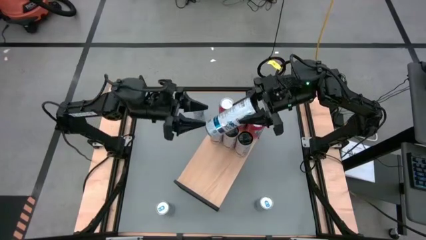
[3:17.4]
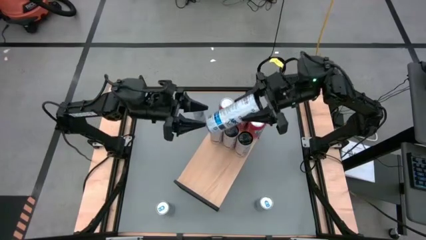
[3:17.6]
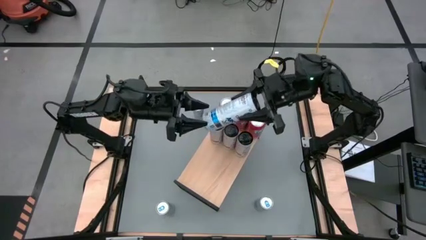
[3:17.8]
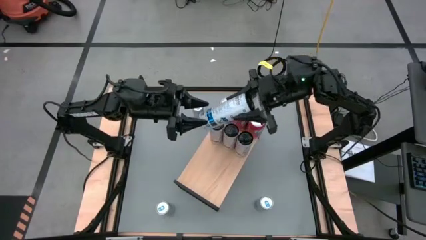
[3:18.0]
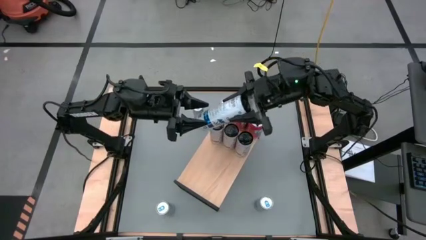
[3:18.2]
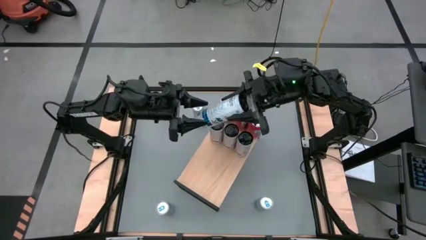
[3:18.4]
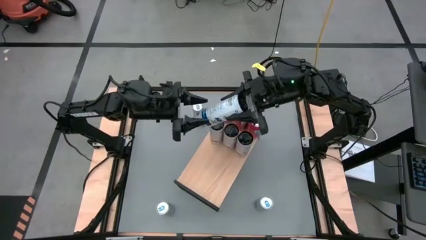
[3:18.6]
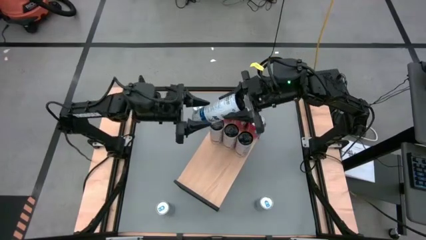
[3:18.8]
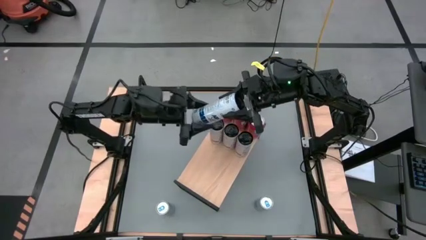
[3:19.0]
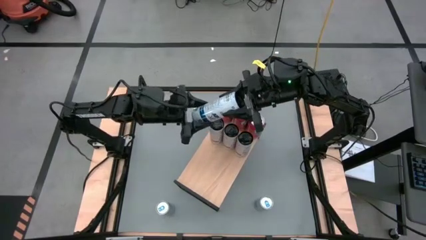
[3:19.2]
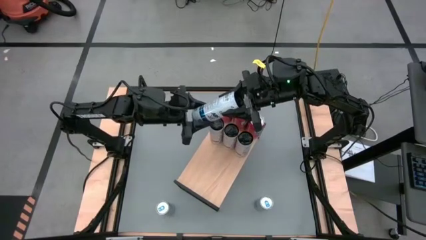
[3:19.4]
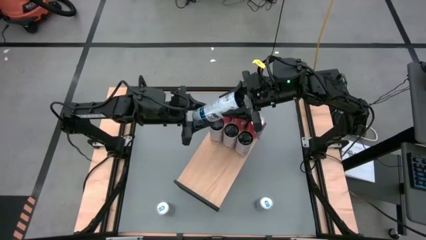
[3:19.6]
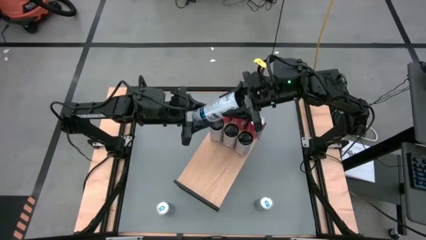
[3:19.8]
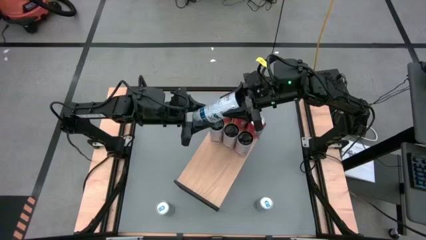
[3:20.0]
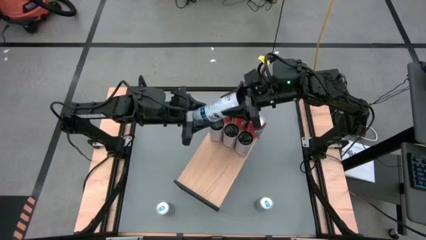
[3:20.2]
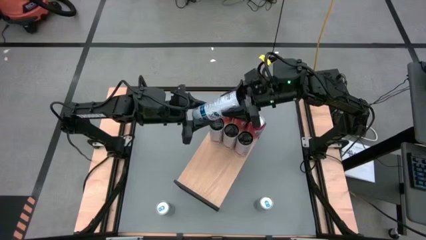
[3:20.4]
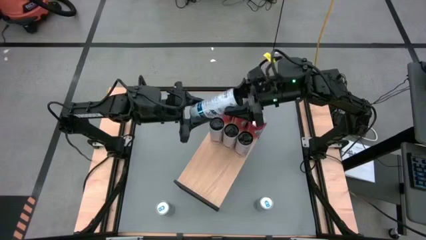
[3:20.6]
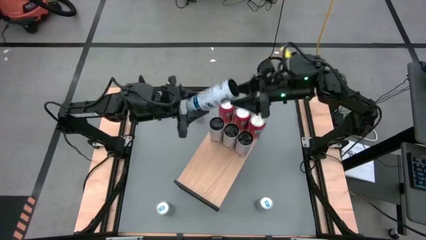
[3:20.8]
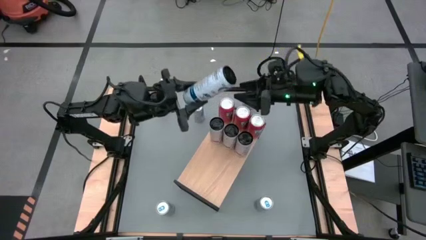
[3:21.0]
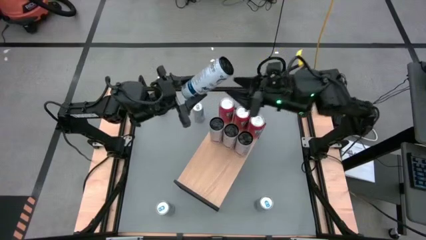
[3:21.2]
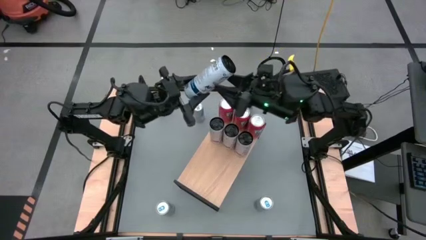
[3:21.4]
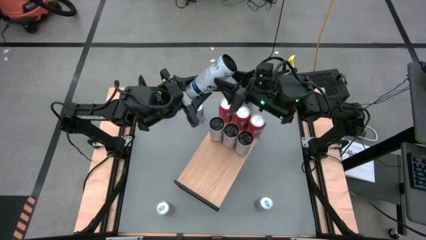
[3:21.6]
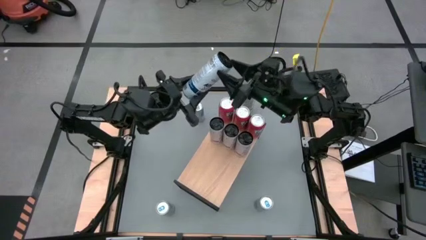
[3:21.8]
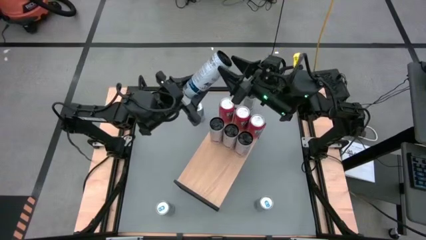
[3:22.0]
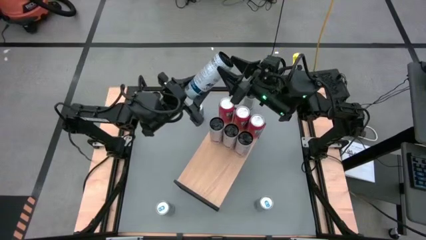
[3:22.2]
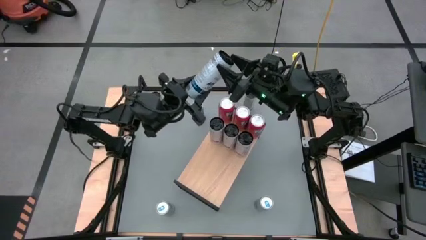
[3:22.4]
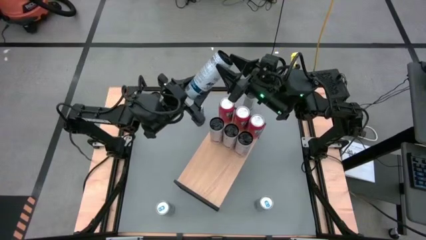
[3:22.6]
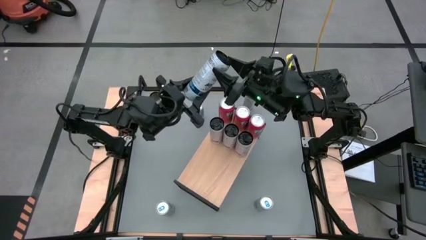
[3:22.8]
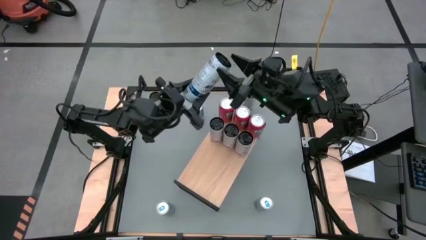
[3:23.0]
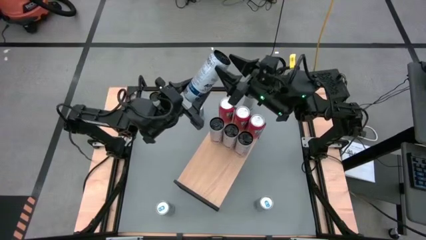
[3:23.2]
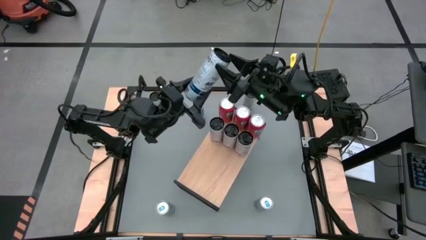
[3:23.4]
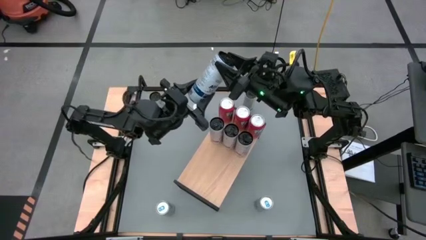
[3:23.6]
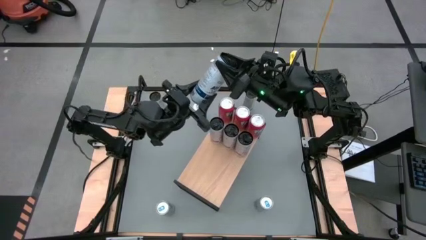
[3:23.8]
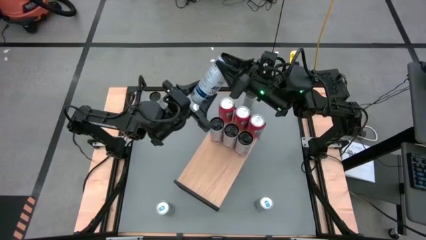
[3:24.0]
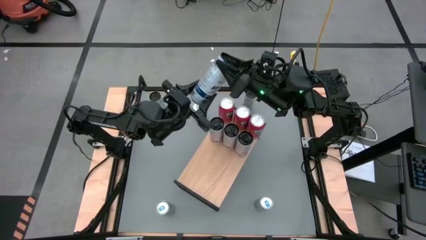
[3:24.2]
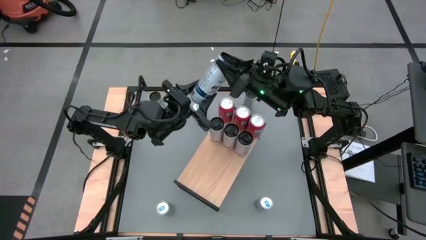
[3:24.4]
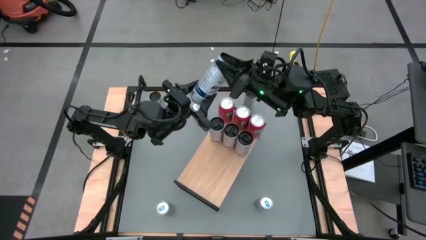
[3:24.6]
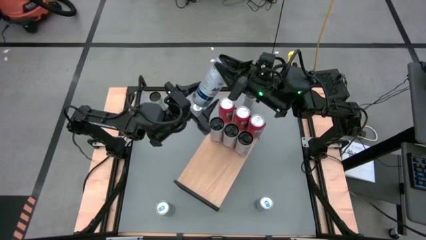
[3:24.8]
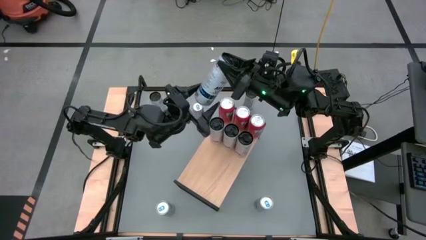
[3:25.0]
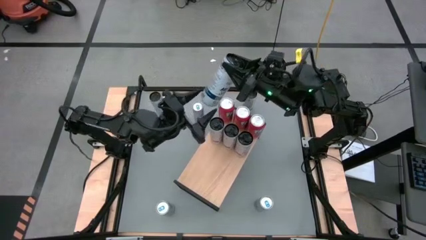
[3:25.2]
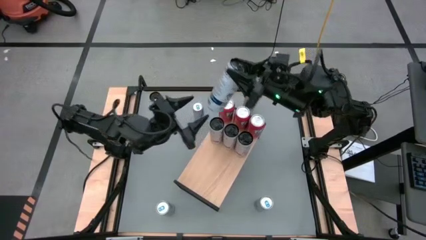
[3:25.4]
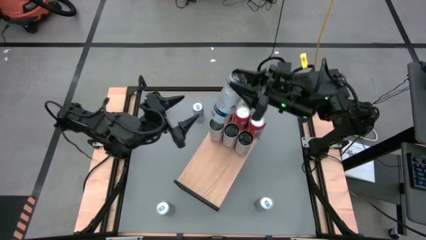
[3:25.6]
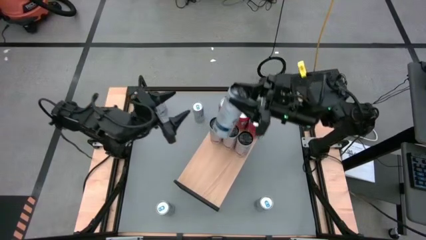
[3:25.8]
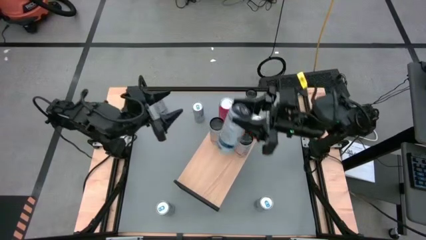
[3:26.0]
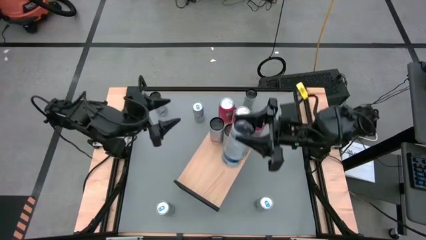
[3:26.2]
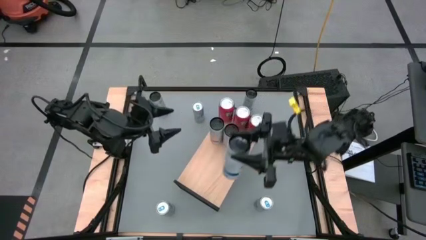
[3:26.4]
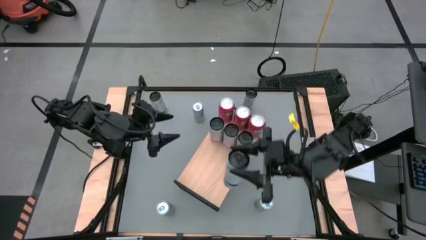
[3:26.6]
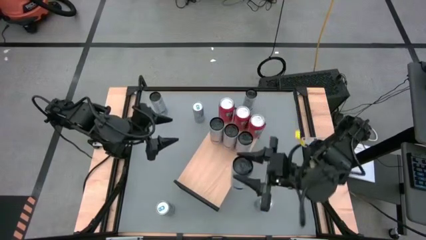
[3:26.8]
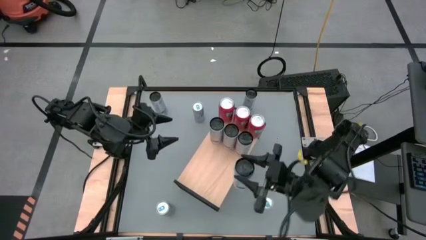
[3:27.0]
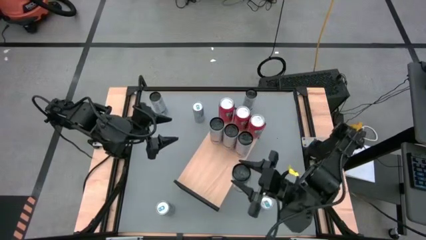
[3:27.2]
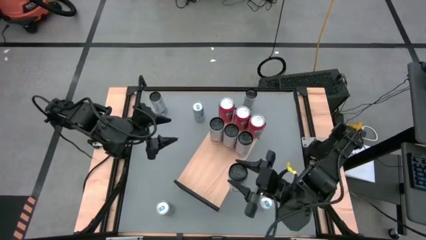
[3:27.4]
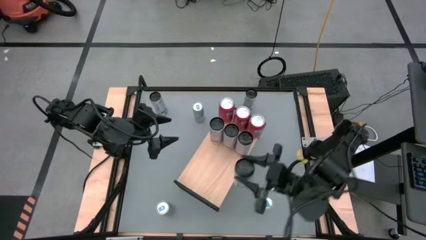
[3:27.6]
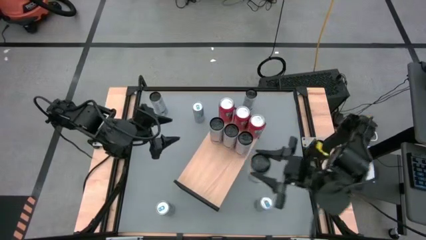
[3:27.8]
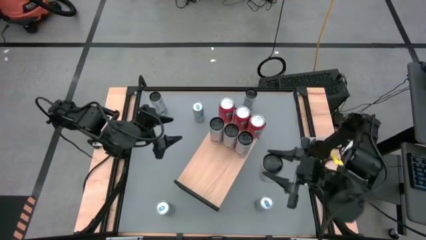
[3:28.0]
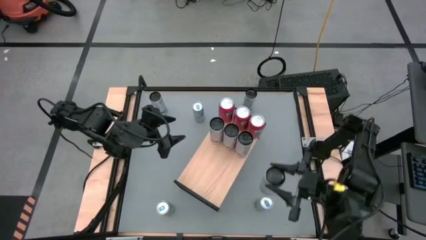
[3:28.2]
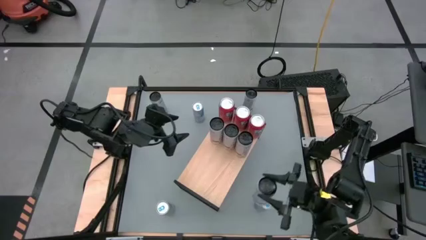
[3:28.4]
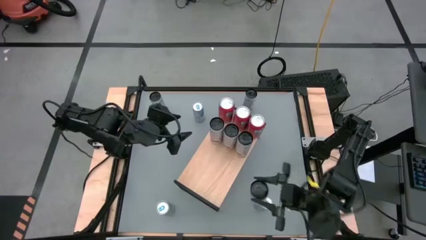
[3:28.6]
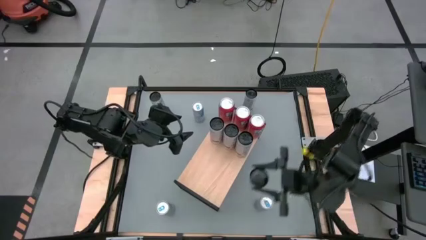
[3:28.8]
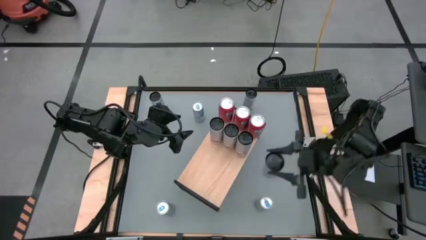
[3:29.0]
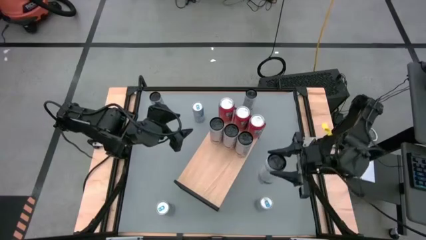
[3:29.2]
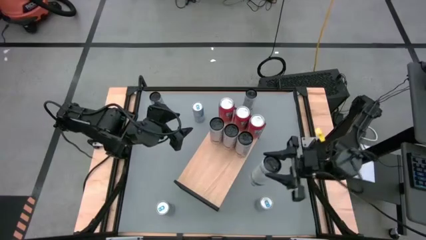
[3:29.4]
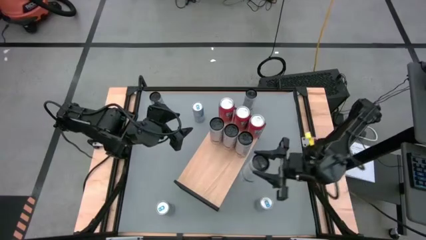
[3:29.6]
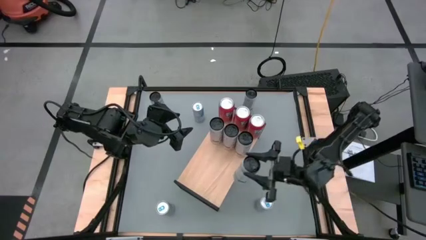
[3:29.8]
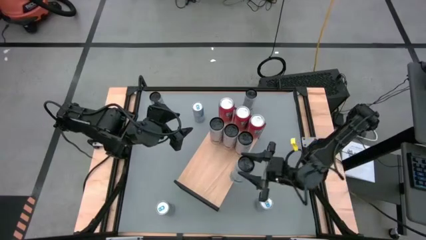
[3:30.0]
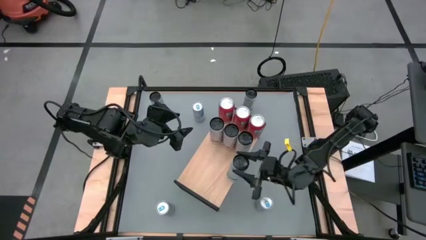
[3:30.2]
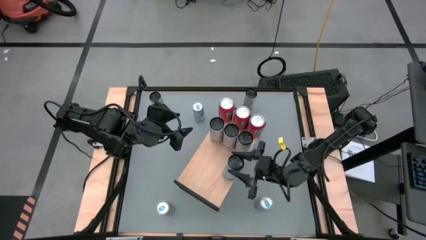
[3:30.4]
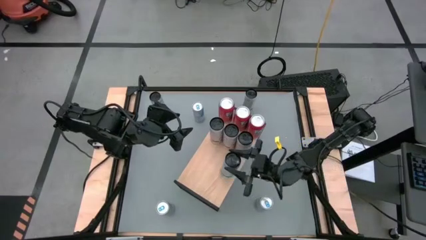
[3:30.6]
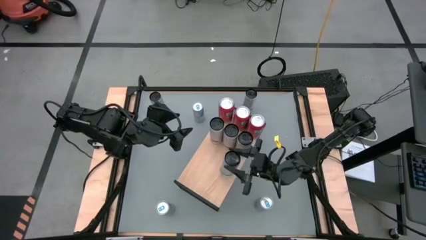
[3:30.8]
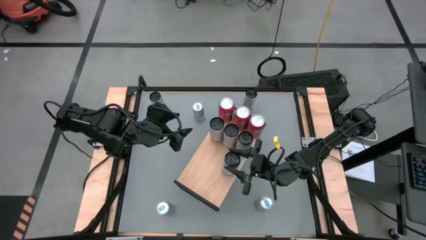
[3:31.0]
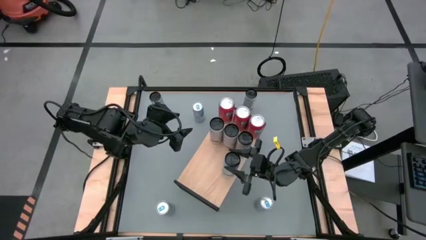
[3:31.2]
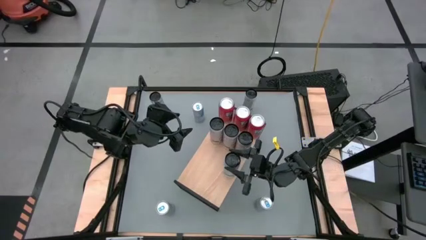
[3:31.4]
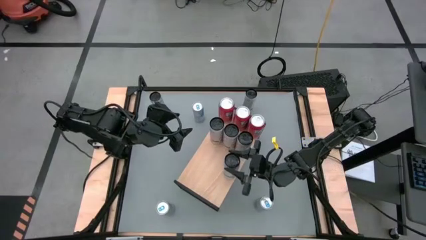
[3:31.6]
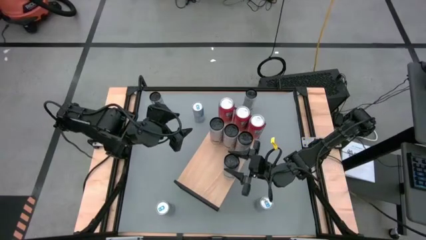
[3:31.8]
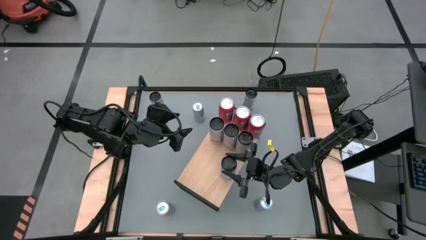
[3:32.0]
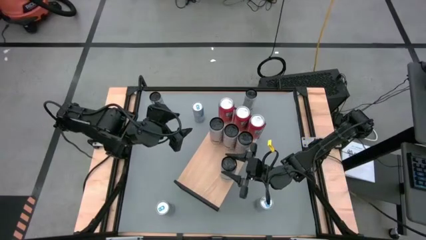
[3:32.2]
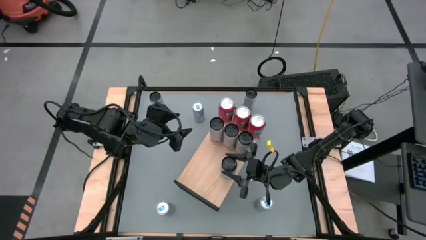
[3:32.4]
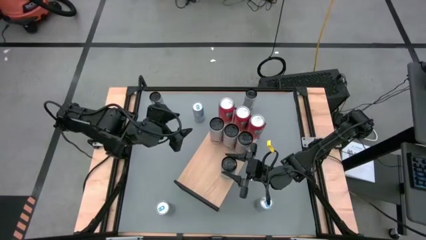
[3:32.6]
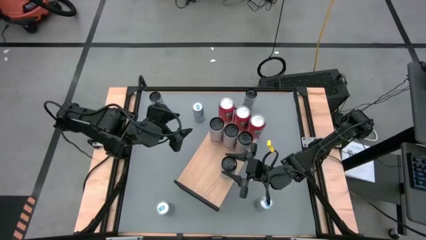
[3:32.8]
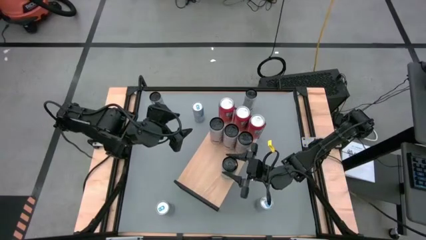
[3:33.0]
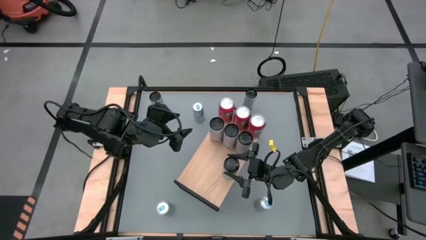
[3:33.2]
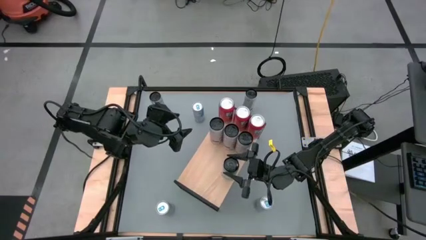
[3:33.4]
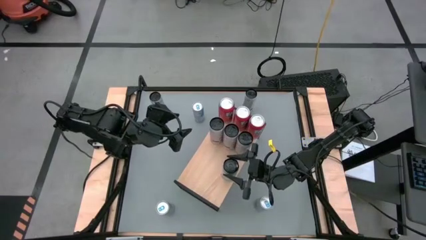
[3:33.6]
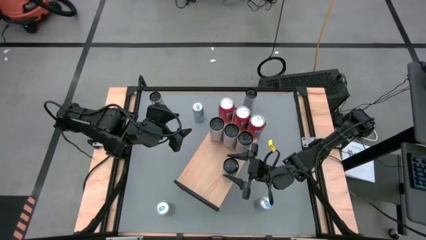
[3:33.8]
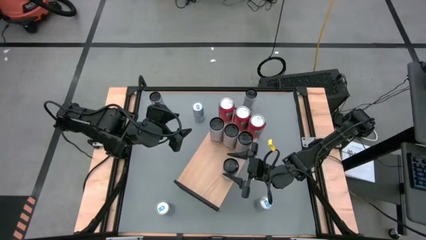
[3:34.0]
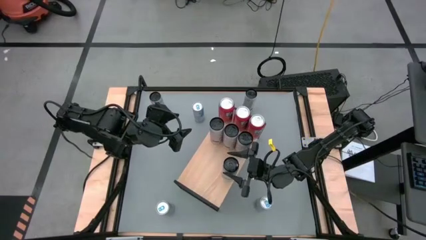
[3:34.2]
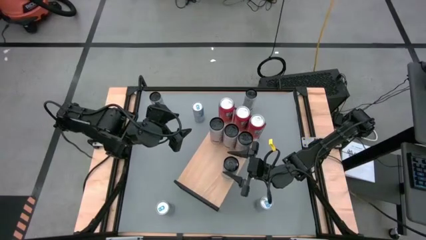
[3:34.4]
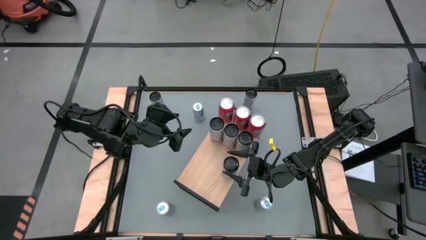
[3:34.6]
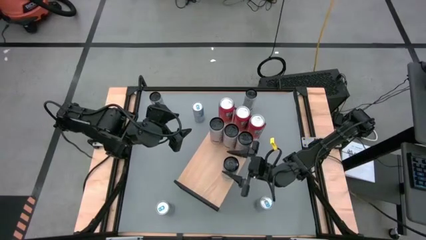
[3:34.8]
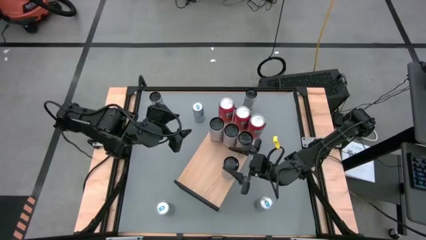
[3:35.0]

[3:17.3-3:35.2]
Task: Place canned beverage on shelf
Put the white blue soda can on the shelf
